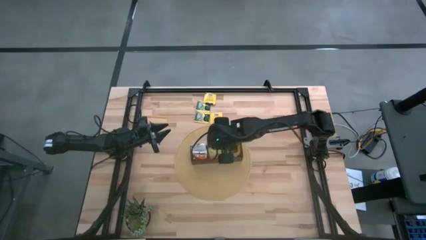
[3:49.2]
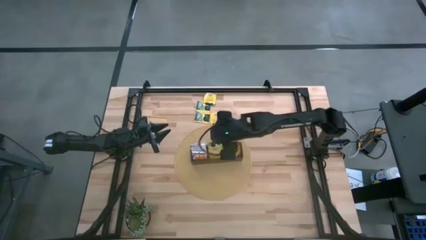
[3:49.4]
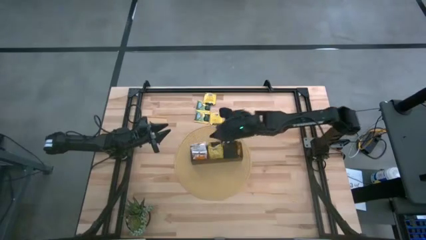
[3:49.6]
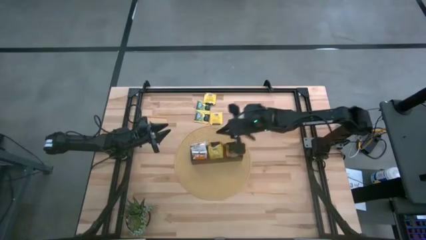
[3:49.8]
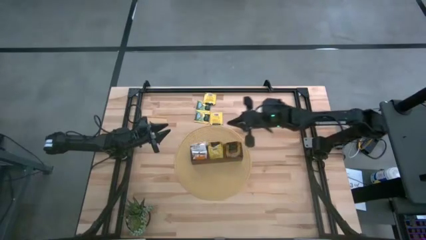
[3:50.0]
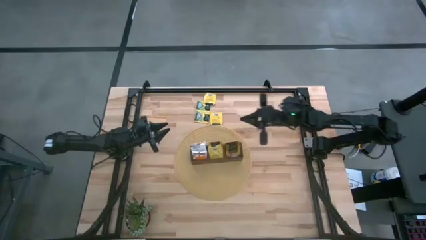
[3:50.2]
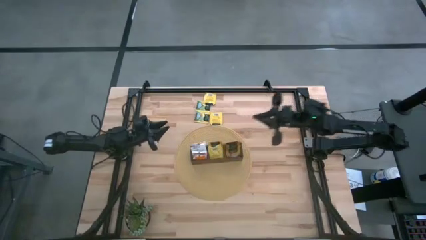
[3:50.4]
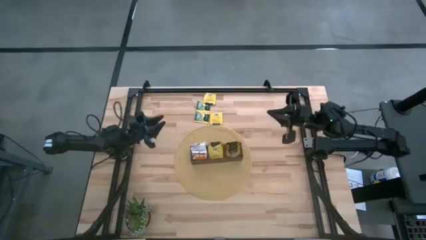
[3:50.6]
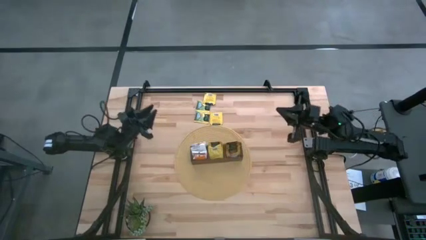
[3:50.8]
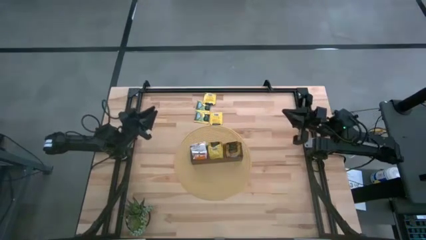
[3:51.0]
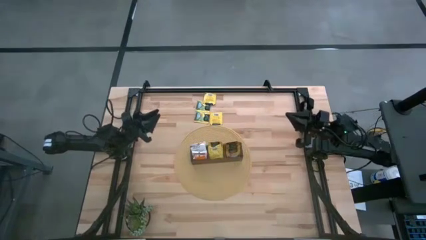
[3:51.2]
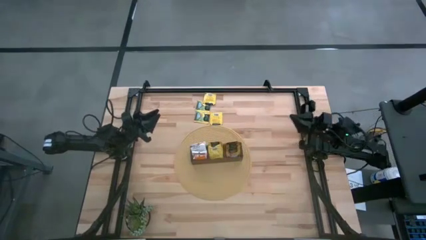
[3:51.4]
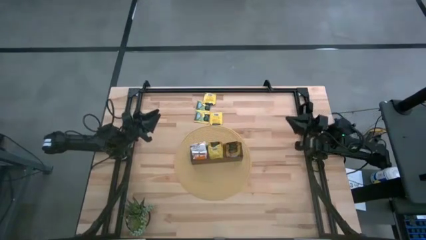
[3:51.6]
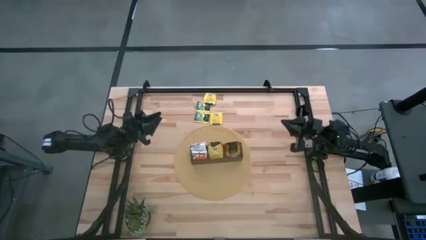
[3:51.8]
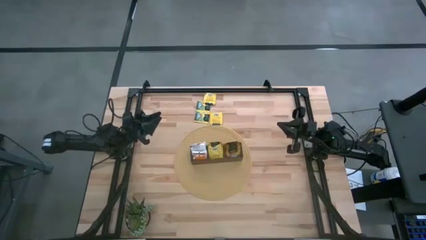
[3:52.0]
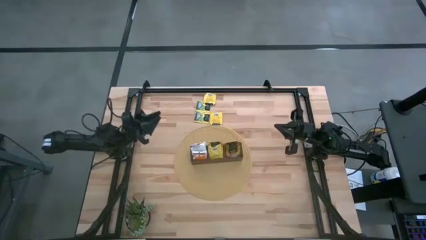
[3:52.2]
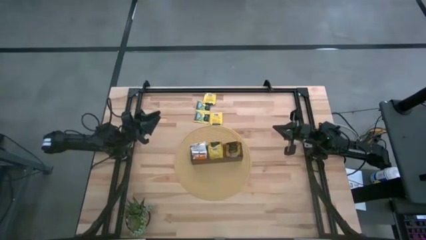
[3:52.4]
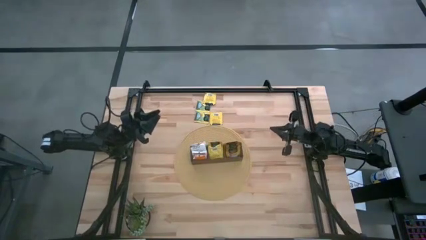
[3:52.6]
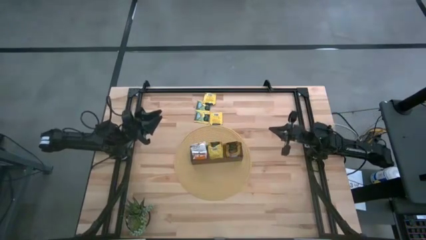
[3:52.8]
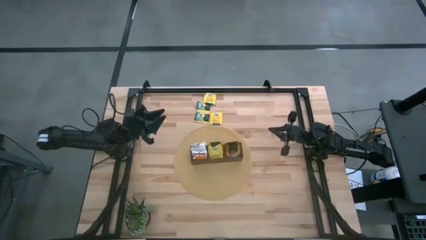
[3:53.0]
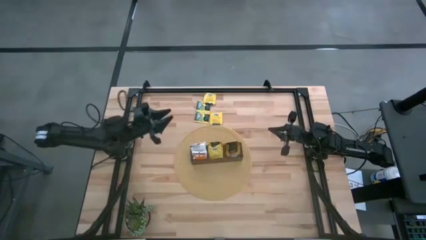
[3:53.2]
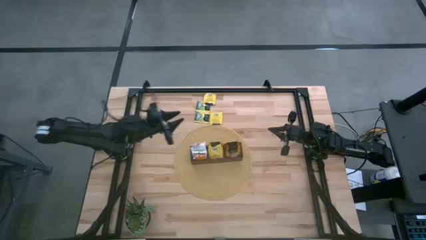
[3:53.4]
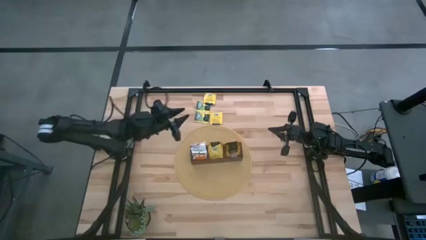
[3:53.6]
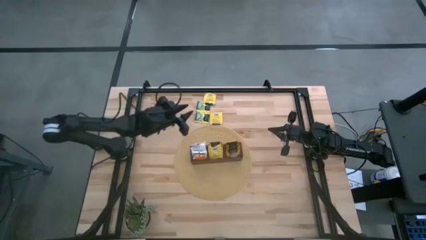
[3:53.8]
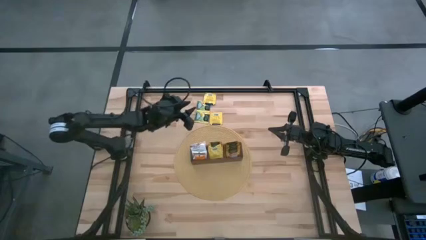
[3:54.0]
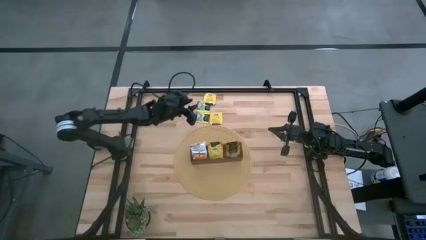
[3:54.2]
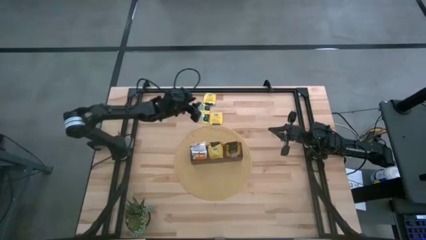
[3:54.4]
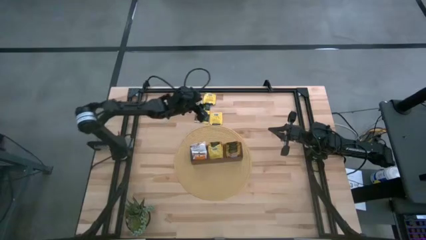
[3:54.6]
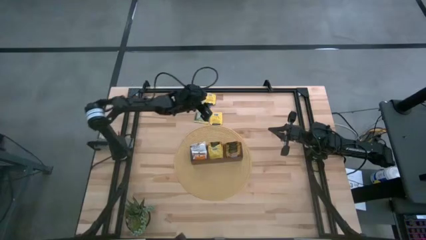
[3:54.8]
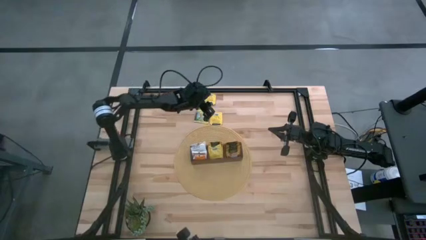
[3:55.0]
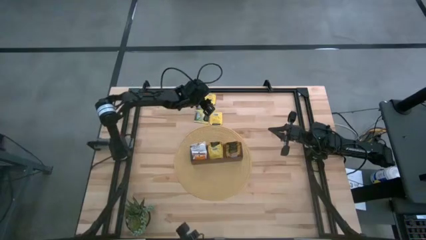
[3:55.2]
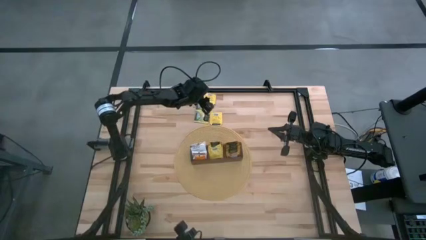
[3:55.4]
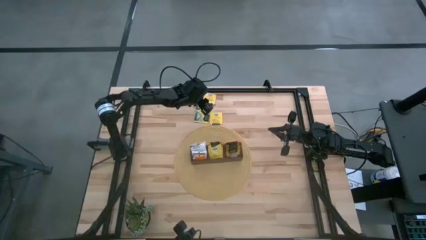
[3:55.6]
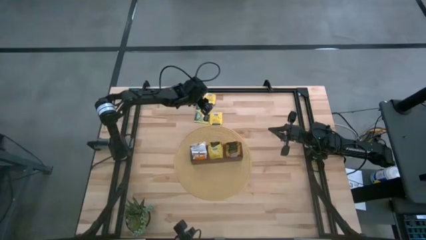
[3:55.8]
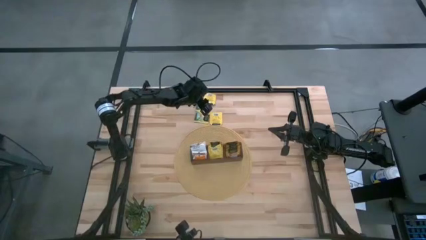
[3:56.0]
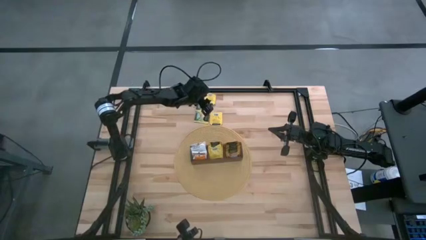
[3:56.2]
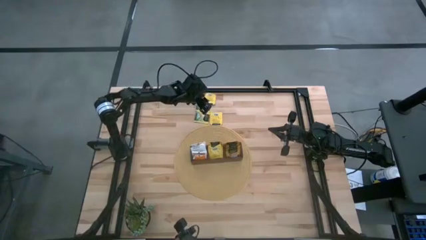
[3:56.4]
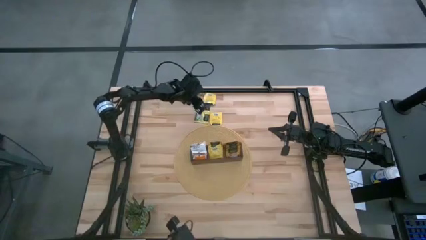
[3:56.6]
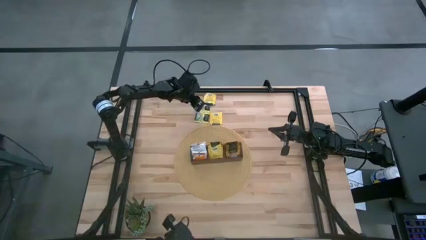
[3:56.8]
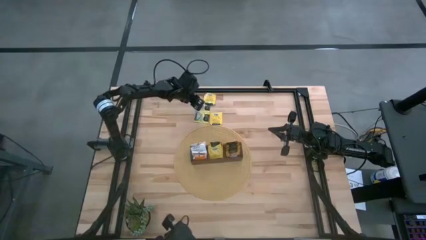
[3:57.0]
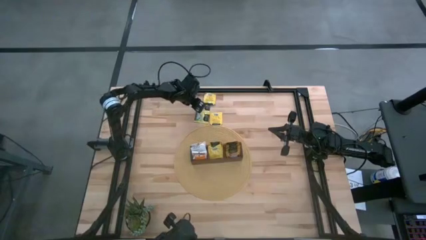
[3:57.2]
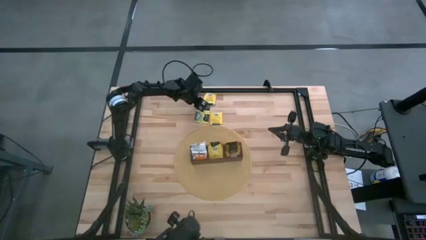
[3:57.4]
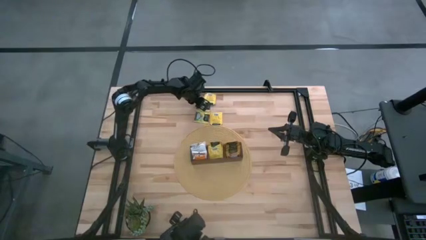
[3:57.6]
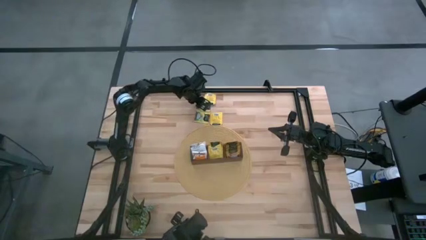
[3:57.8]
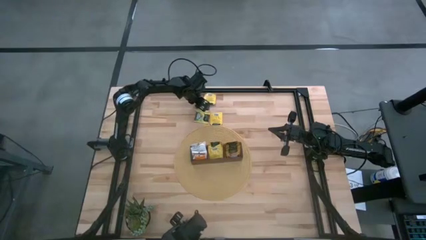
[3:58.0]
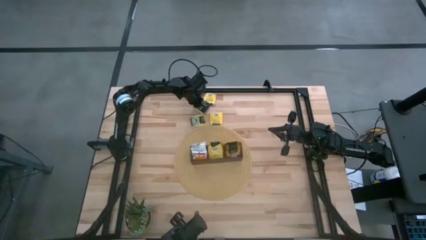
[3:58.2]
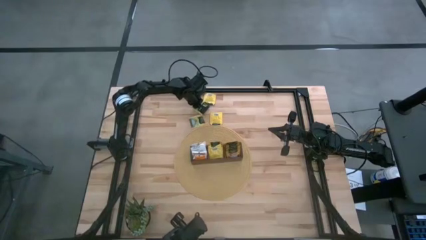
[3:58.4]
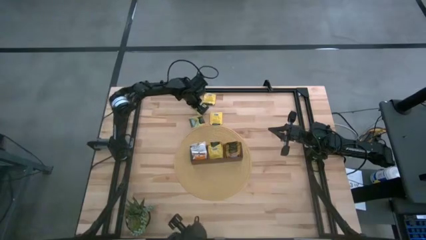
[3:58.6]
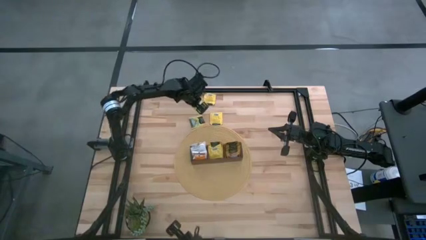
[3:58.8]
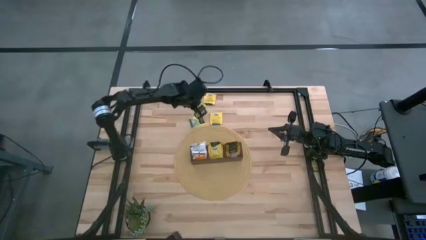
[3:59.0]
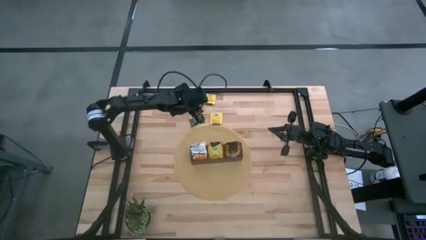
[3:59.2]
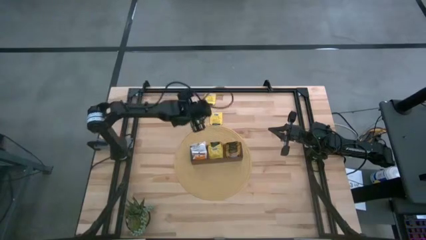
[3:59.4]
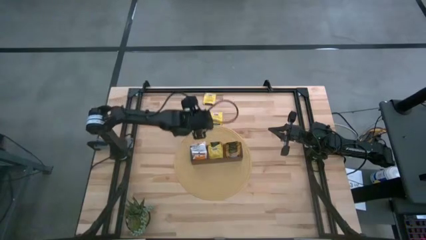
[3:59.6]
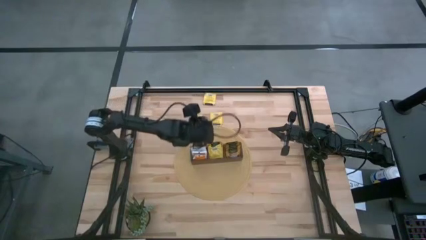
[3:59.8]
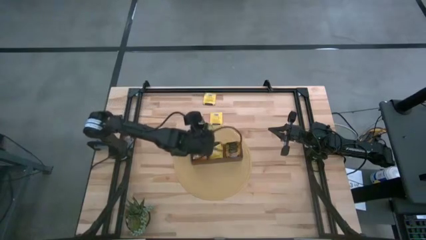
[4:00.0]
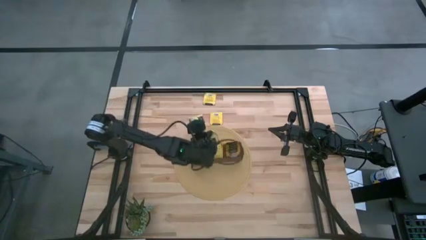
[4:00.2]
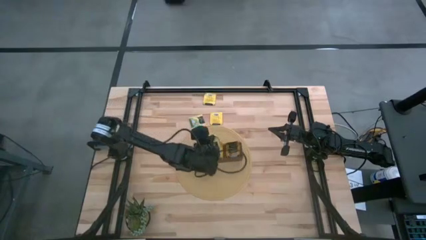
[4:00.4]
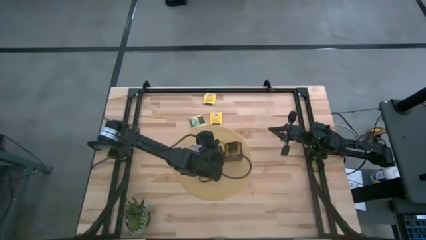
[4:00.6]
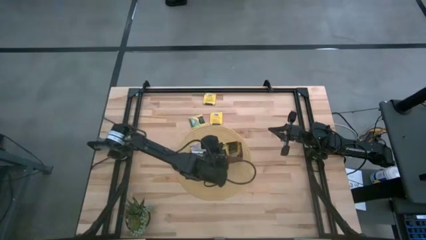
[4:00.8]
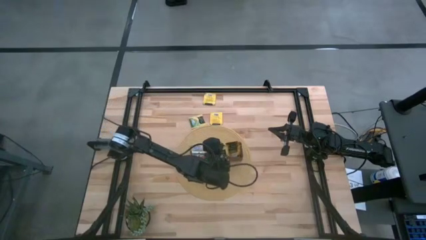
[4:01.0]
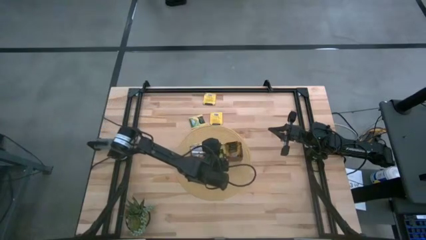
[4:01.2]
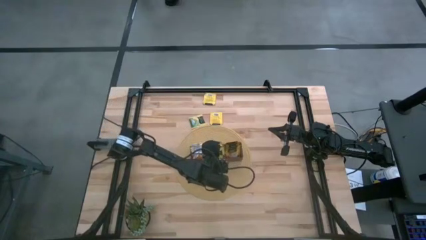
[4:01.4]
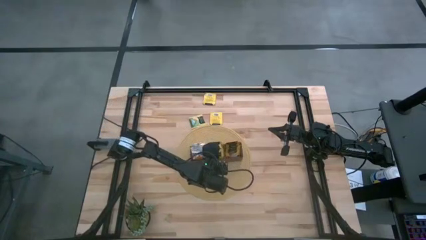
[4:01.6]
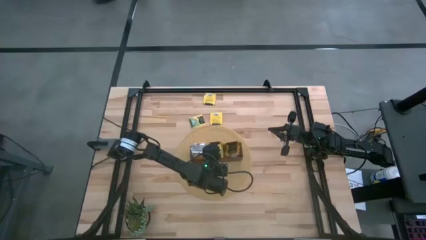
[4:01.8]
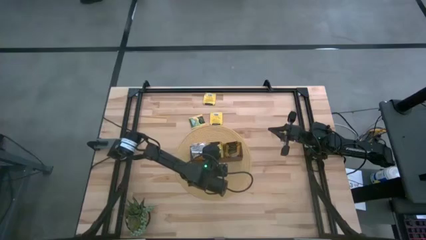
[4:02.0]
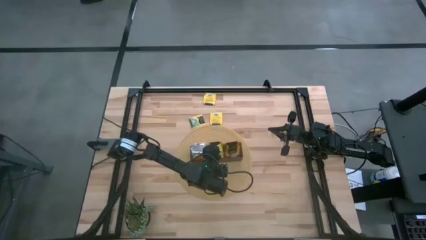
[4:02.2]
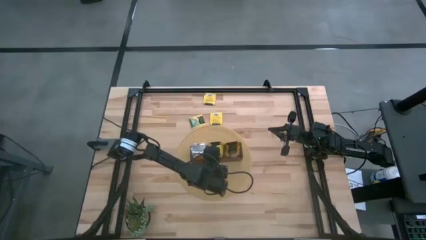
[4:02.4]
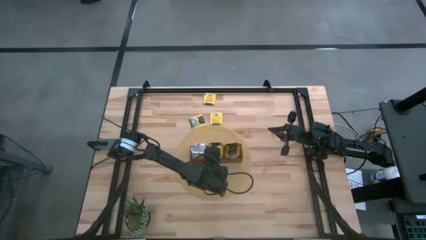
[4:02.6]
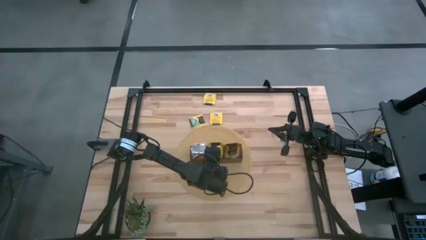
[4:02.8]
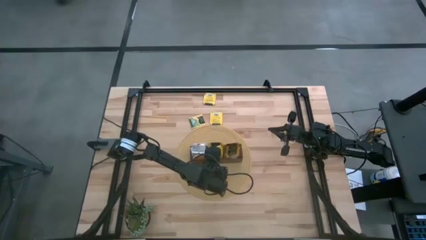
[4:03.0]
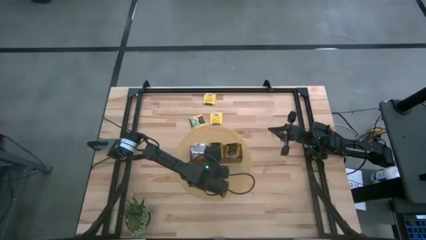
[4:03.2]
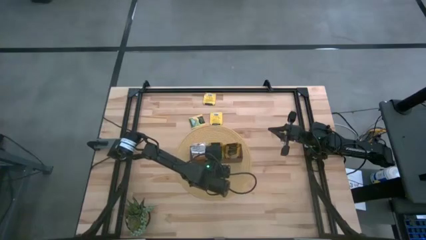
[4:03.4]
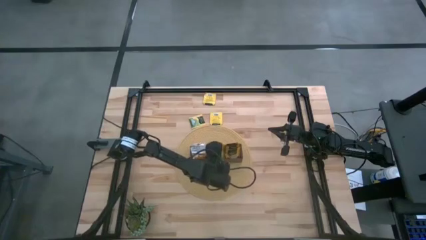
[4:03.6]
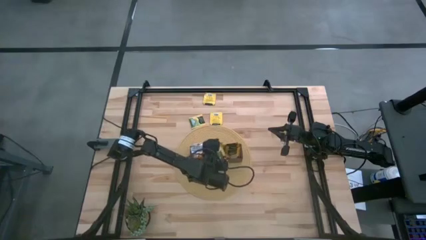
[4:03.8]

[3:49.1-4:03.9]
Task: Pick & Place Tea
Put the yellow tea bag into the wooden organizer

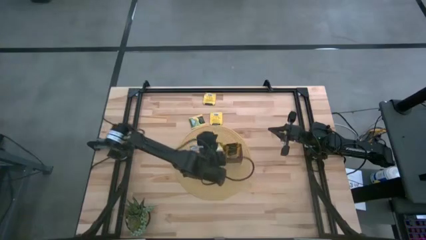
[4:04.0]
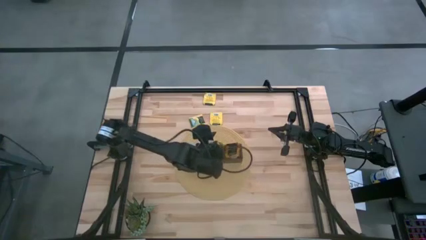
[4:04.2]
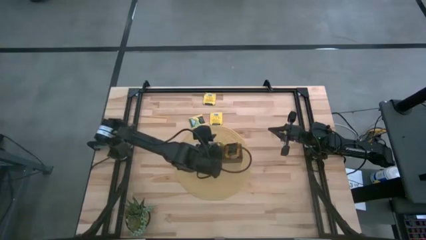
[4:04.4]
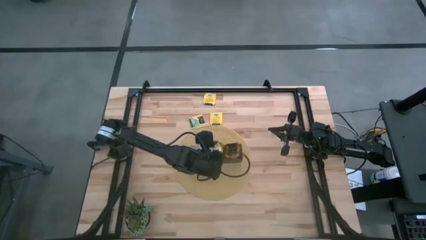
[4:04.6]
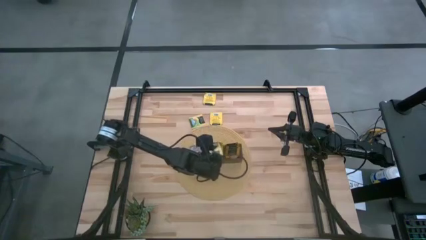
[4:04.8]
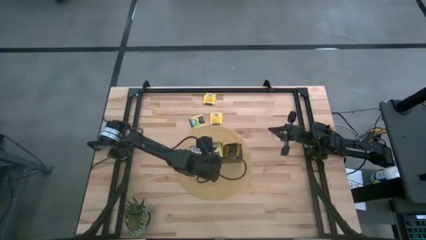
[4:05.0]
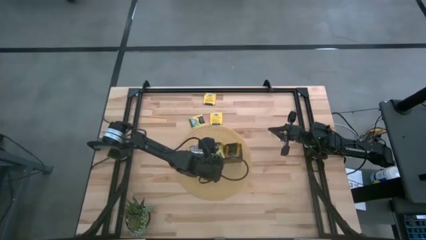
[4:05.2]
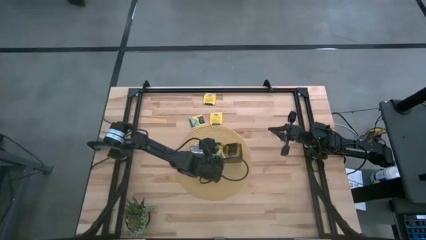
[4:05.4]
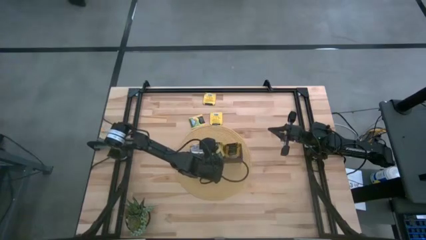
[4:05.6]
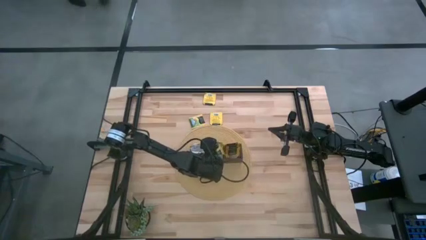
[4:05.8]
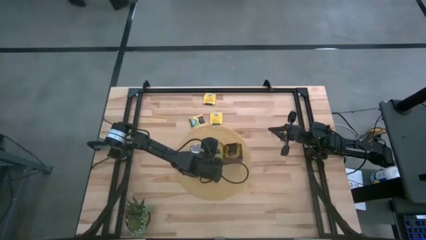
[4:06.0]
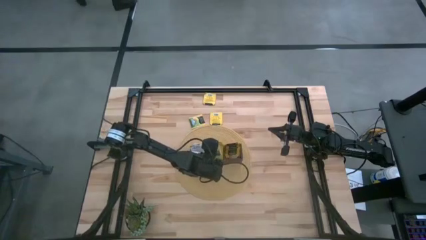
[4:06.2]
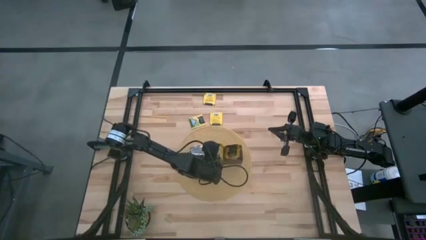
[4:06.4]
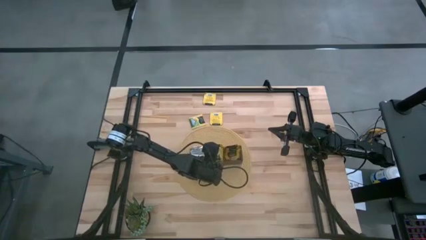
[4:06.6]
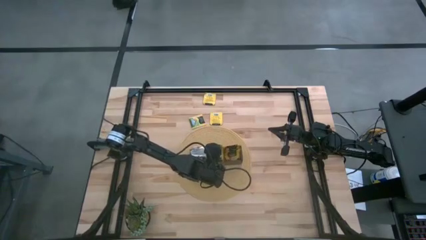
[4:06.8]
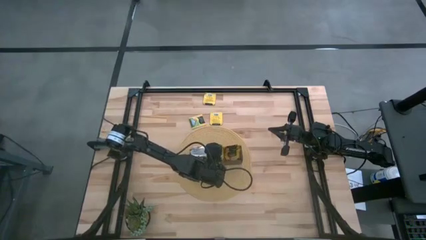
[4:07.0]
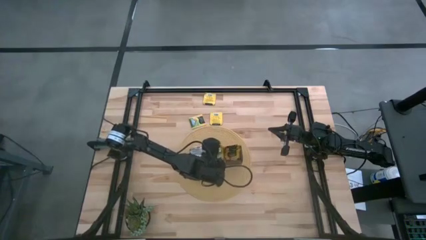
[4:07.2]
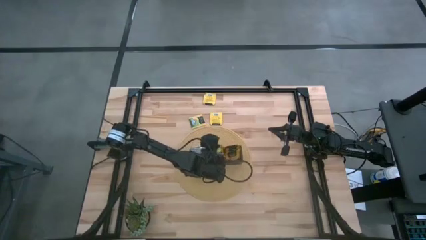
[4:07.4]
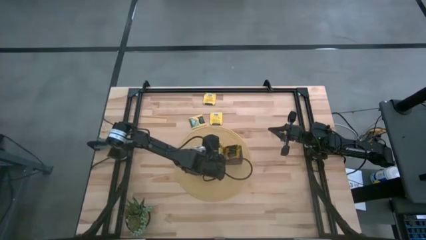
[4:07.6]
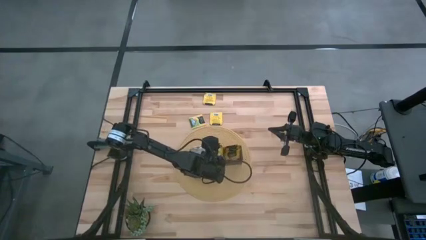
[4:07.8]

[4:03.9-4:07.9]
Put the yellow tea bag into the wooden organizer
